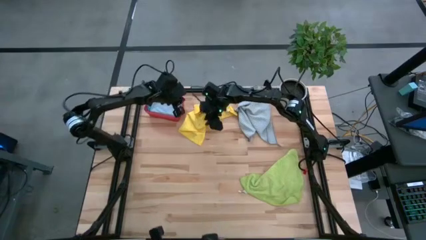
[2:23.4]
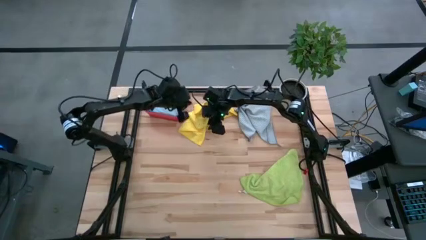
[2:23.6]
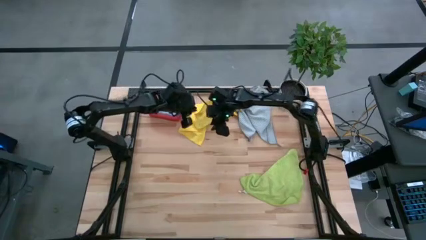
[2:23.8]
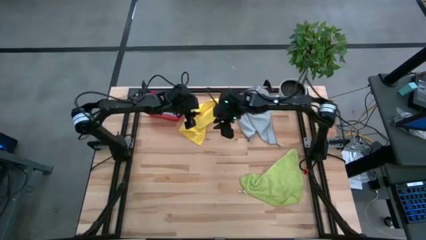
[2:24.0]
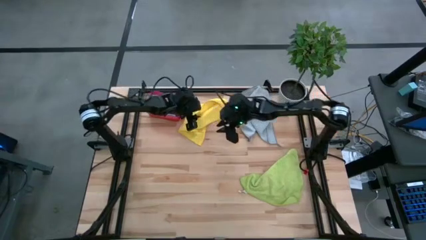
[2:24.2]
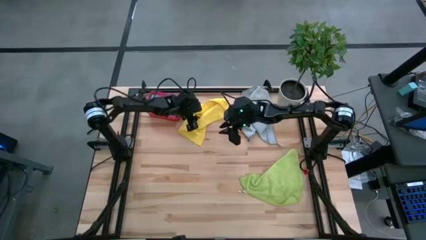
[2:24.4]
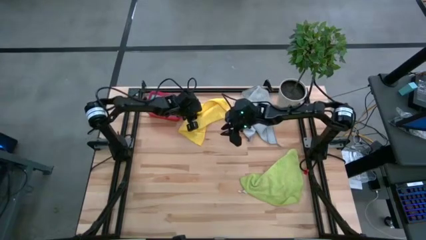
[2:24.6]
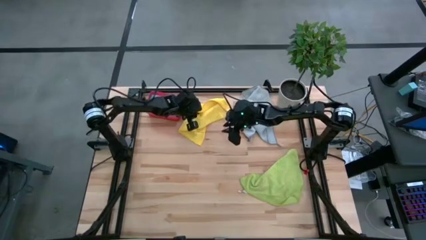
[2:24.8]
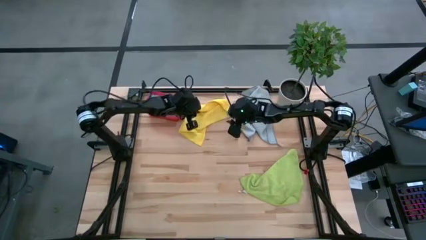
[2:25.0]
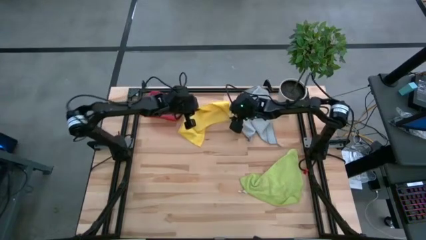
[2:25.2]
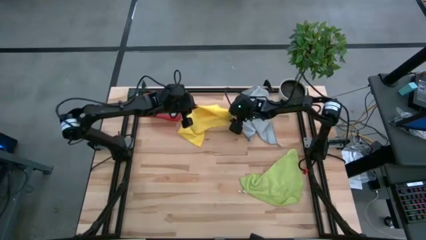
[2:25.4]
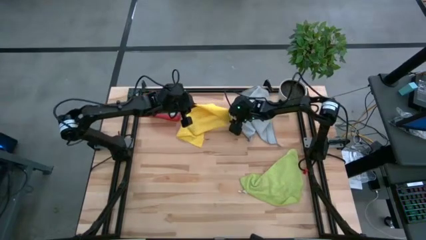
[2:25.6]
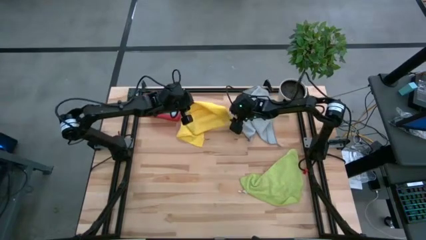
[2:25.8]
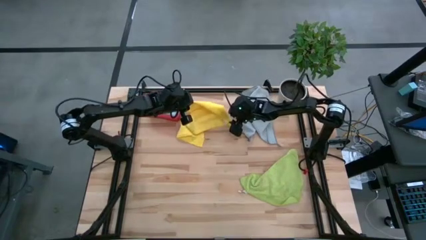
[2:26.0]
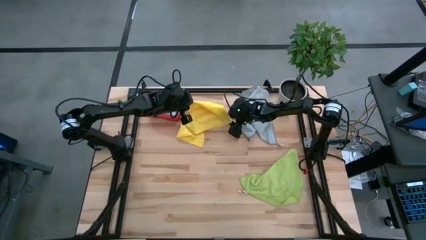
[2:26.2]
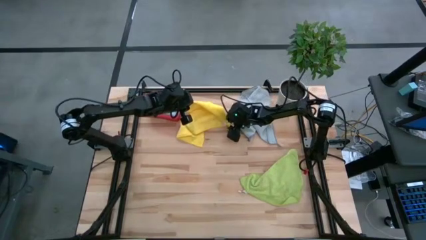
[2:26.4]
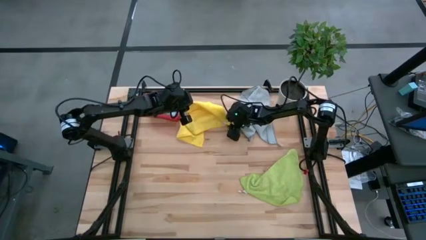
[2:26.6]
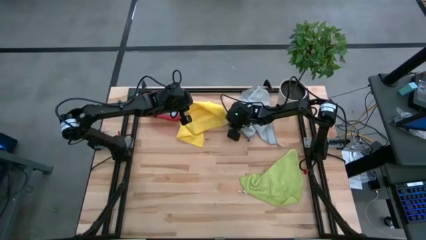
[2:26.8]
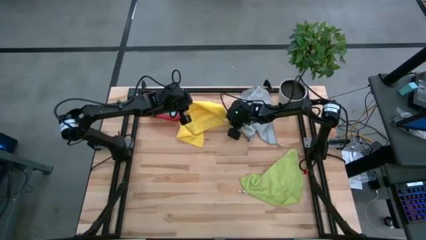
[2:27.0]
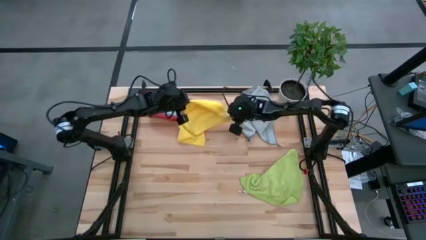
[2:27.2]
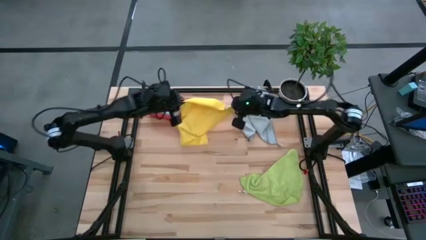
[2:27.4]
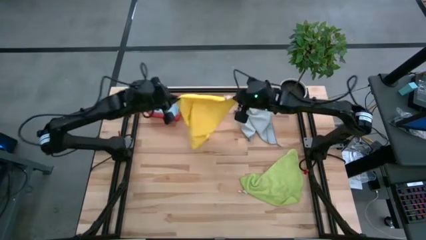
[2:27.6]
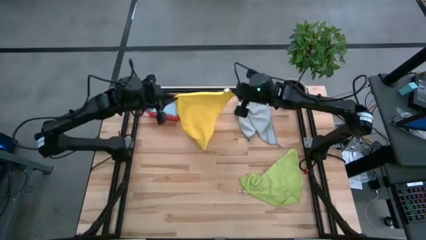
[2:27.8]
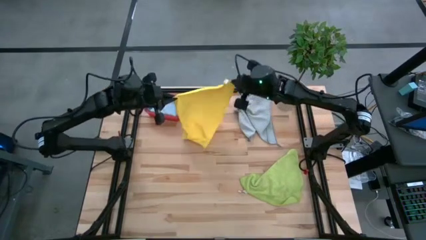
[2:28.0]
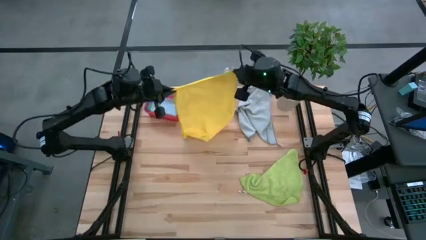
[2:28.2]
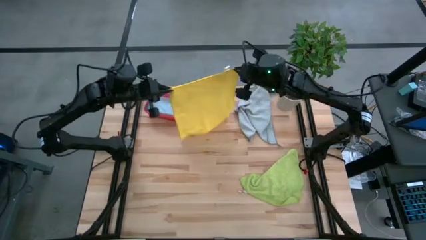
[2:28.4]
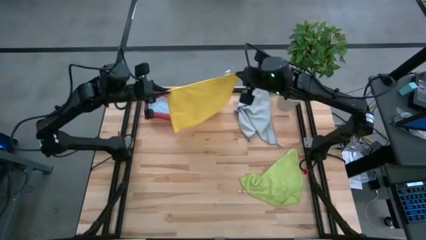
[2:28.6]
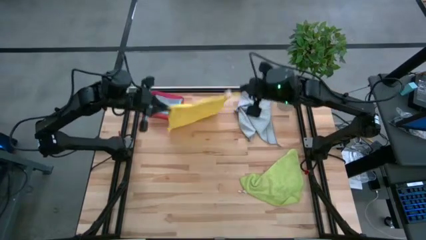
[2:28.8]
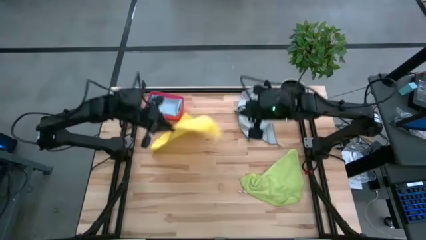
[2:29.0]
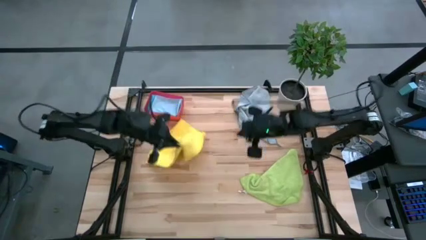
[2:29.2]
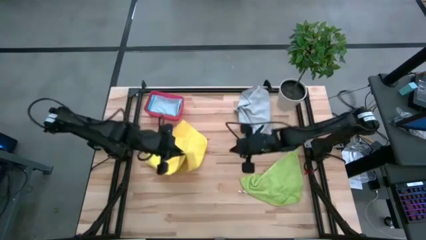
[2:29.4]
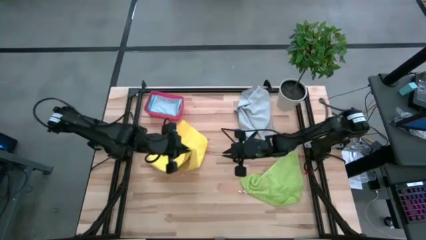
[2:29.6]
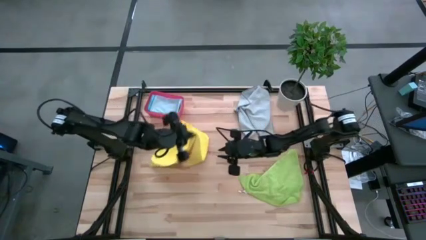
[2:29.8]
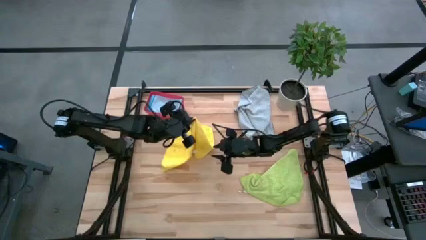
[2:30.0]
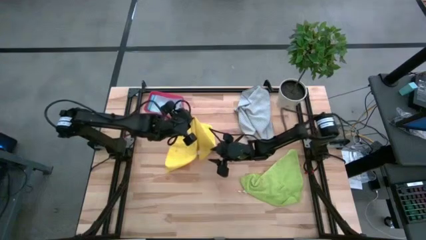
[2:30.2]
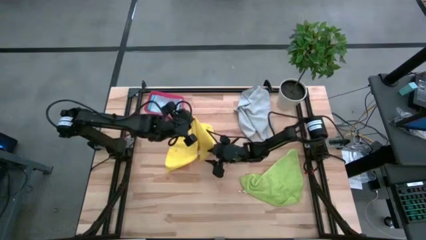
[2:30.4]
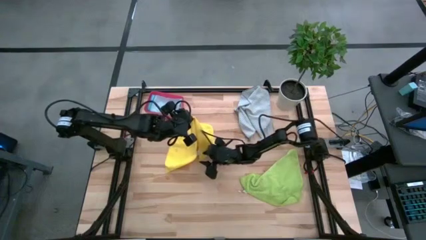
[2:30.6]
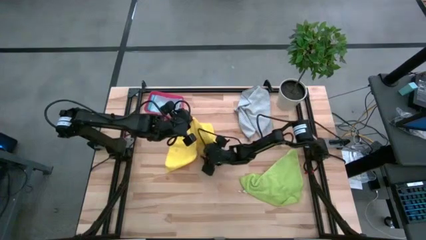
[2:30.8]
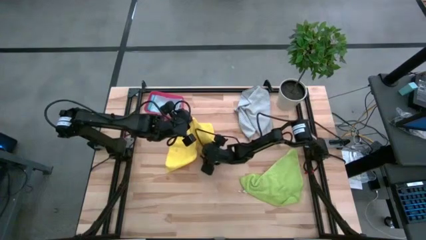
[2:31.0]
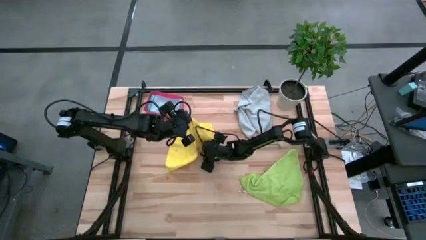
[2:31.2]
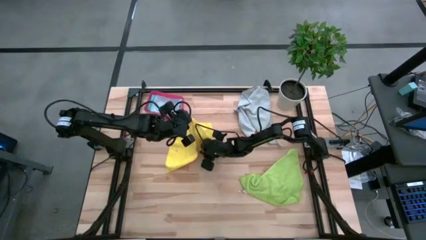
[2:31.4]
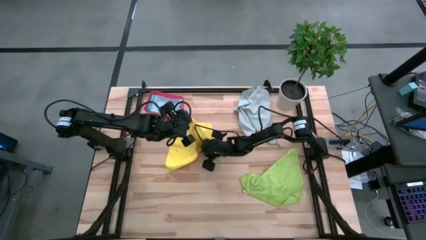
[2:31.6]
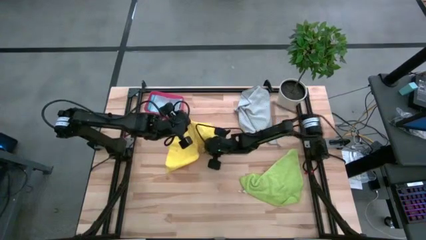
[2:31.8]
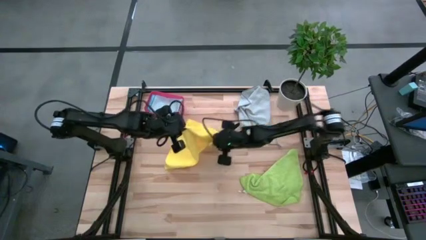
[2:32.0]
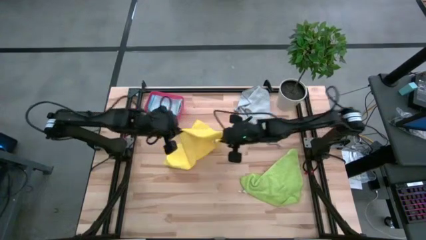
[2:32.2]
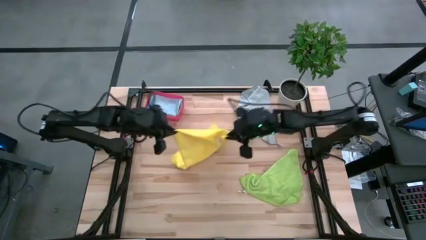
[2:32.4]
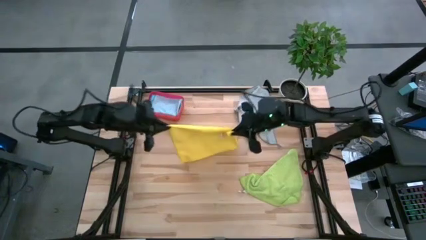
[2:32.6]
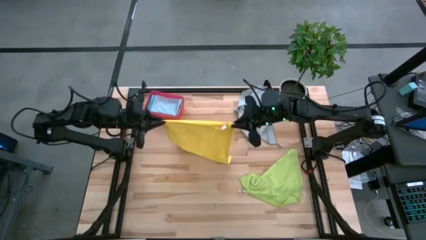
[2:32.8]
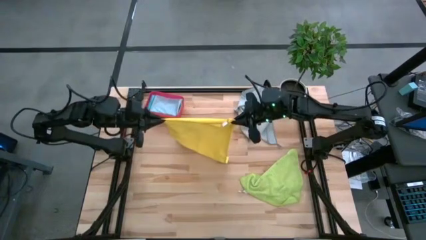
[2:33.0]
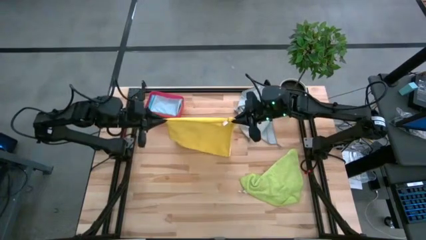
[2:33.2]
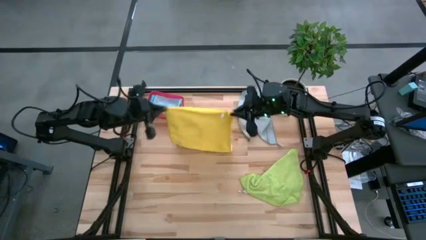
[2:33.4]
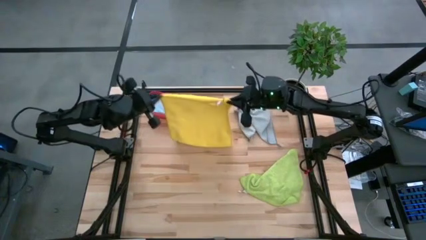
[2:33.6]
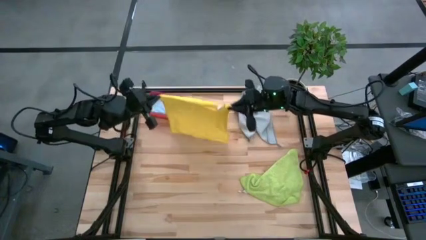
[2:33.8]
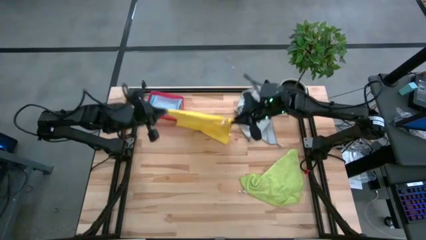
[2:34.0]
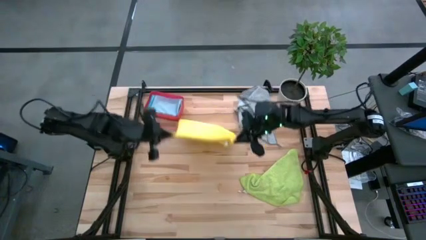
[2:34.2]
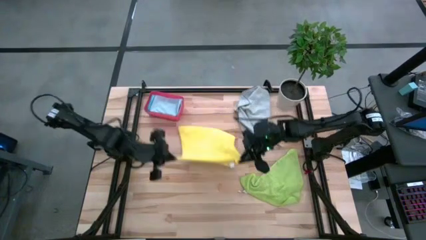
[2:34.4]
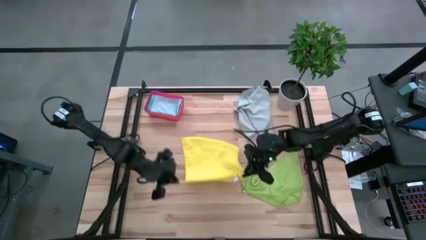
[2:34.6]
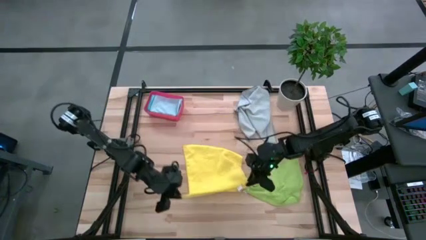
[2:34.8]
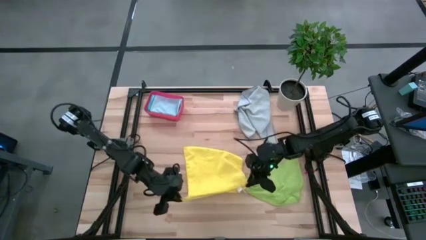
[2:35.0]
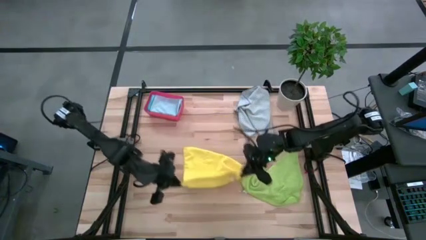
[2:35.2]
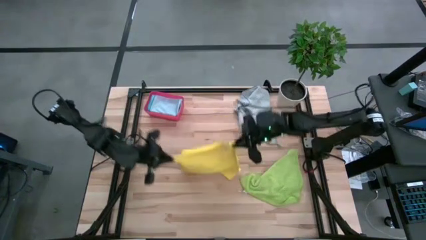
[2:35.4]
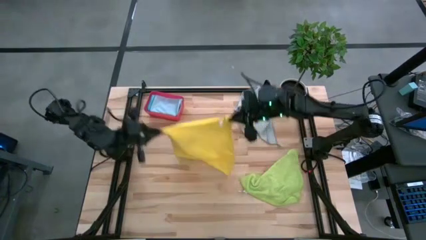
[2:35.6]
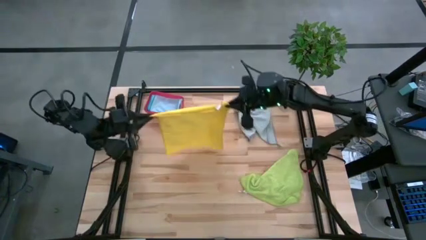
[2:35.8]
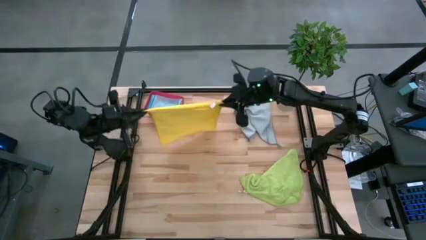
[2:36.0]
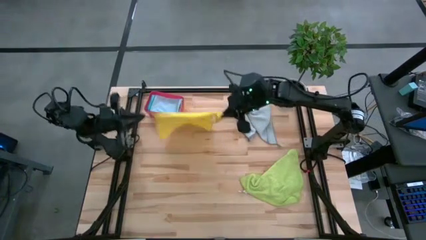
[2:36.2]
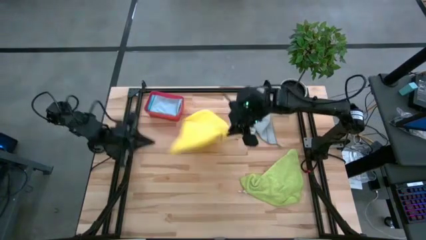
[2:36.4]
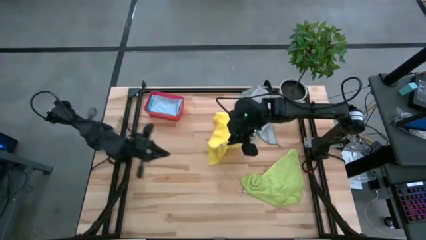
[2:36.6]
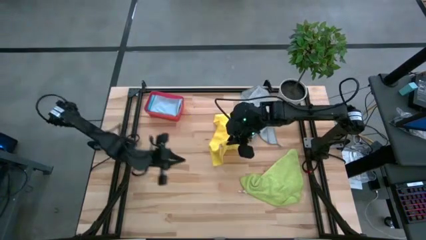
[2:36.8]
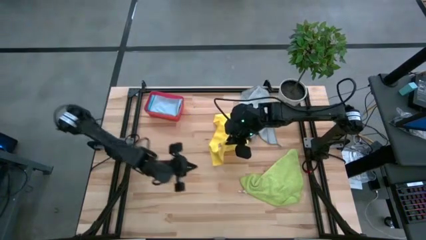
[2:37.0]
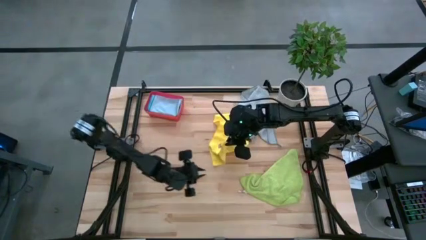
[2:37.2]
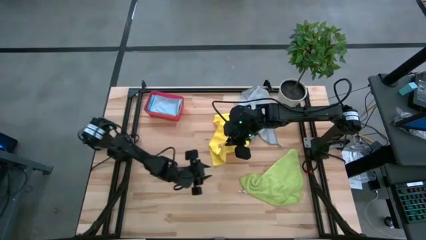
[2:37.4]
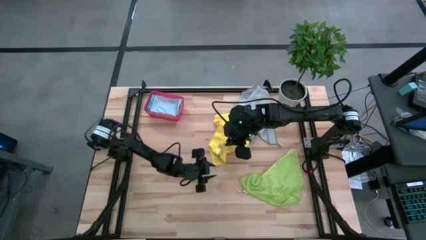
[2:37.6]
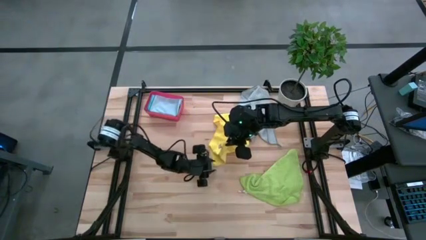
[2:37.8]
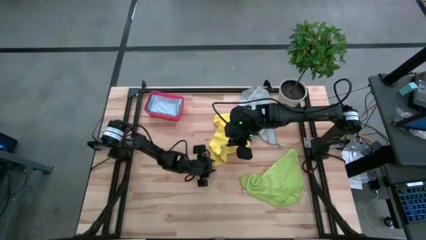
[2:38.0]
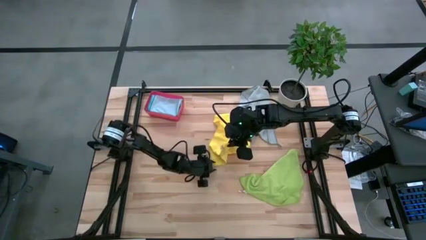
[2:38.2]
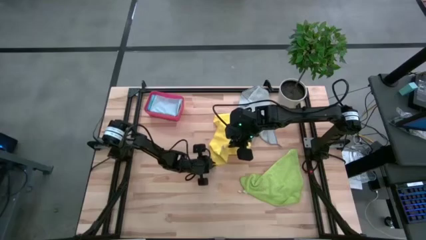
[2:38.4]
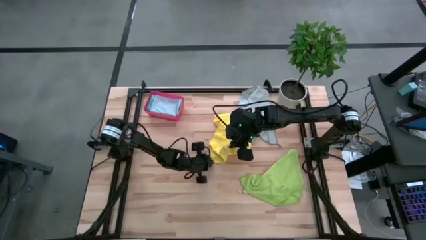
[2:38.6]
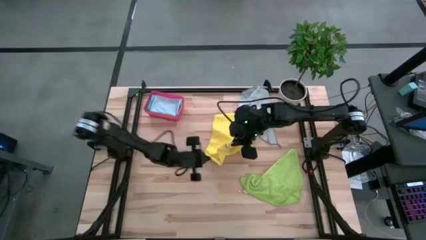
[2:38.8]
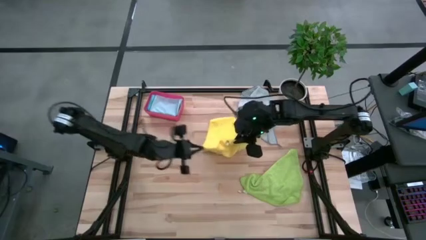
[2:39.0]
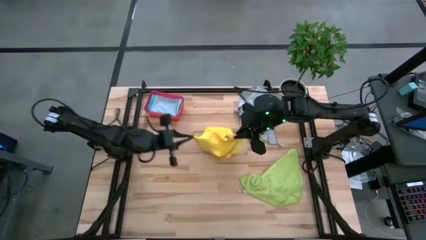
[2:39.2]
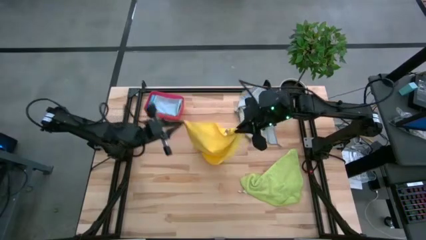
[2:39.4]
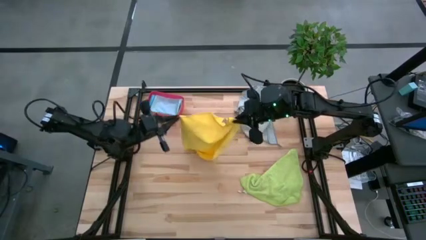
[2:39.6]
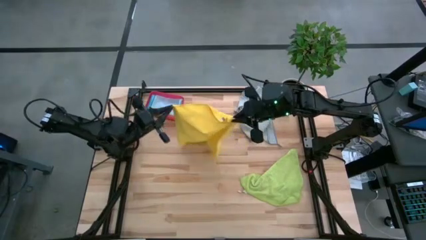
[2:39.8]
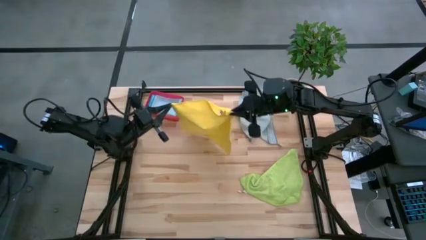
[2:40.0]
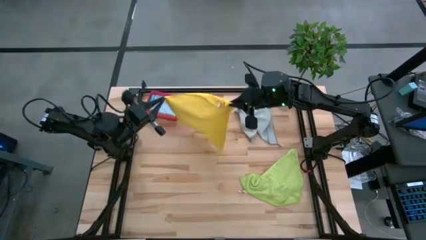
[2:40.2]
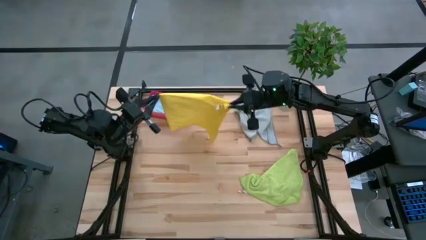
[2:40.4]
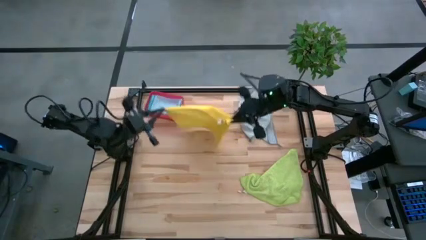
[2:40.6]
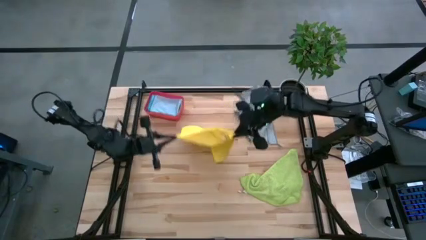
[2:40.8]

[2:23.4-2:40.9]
Task: Fold microfiber towels
Fold the yellow microfiber cloth
